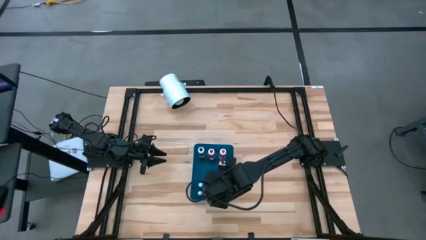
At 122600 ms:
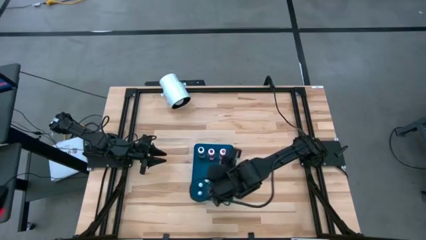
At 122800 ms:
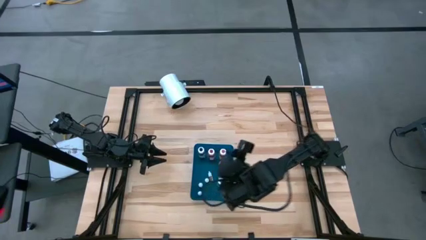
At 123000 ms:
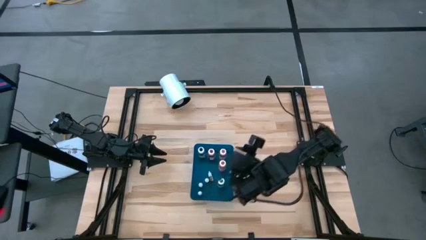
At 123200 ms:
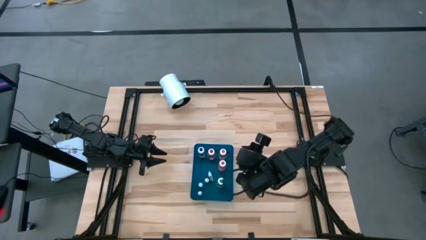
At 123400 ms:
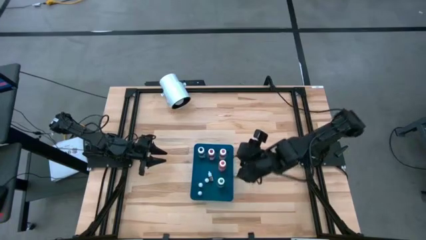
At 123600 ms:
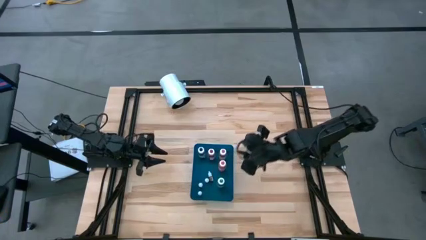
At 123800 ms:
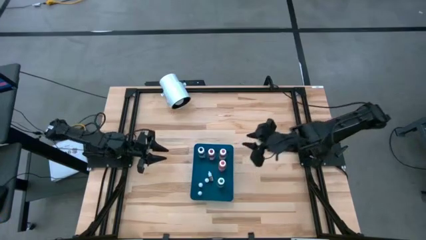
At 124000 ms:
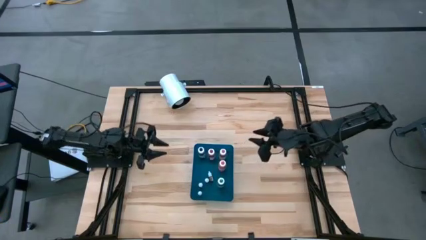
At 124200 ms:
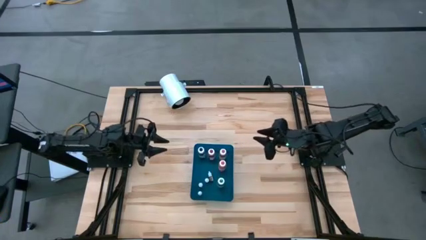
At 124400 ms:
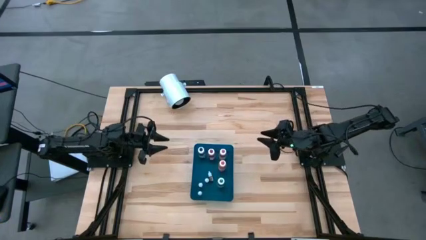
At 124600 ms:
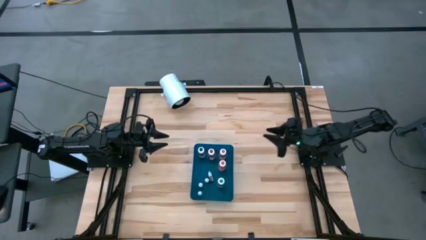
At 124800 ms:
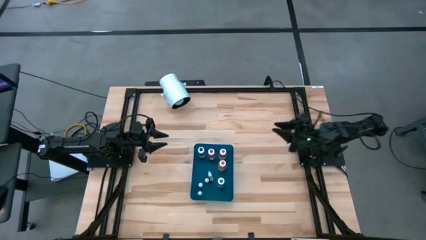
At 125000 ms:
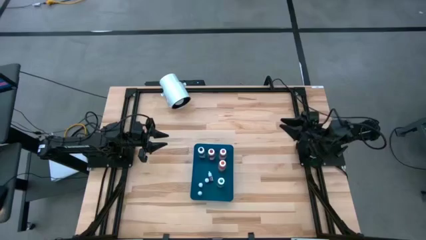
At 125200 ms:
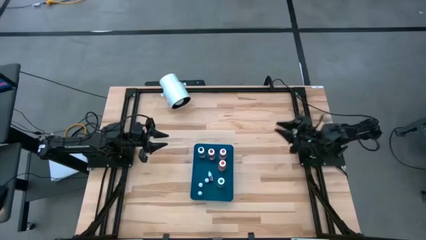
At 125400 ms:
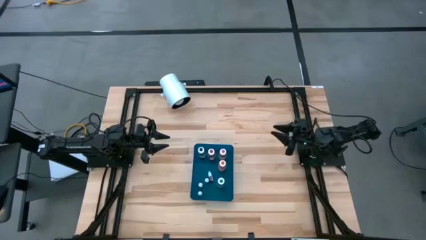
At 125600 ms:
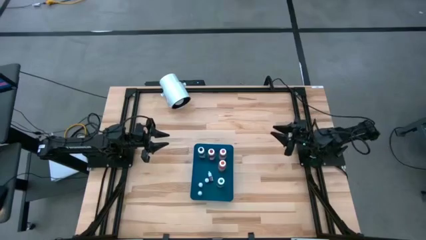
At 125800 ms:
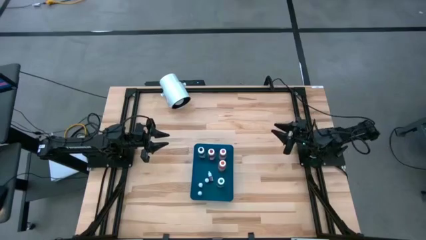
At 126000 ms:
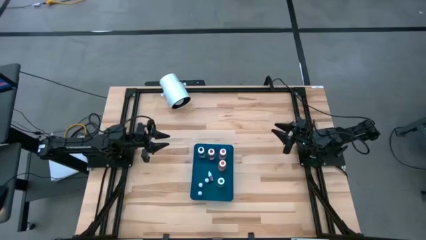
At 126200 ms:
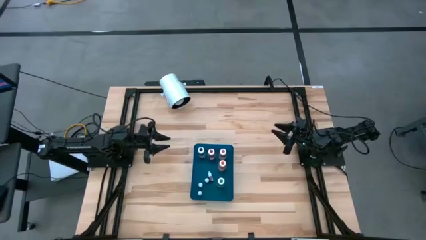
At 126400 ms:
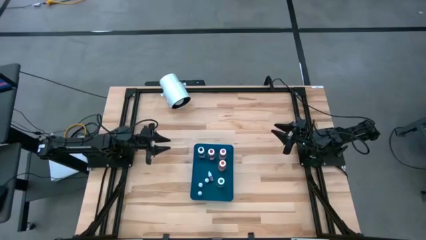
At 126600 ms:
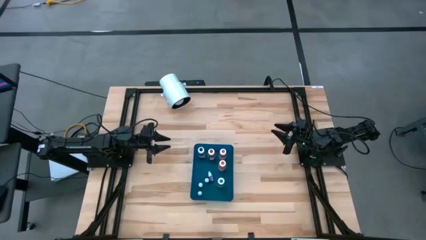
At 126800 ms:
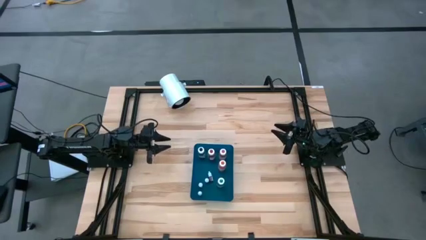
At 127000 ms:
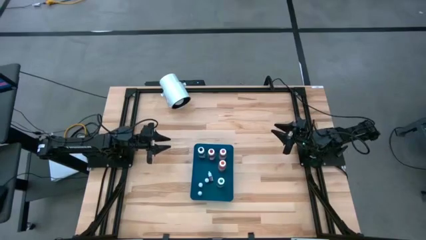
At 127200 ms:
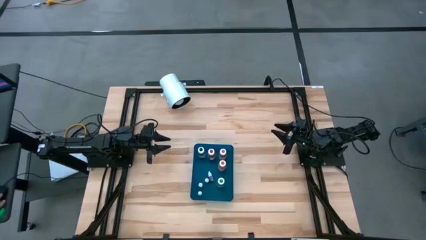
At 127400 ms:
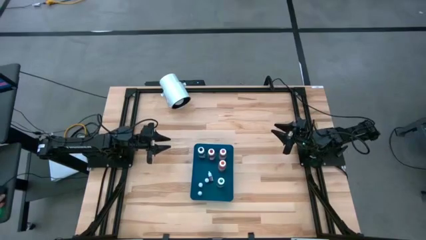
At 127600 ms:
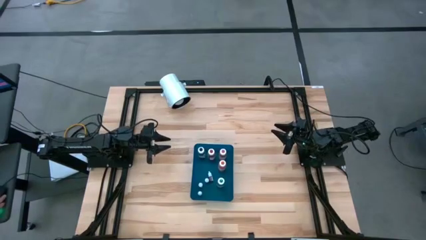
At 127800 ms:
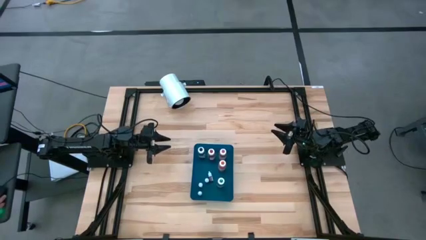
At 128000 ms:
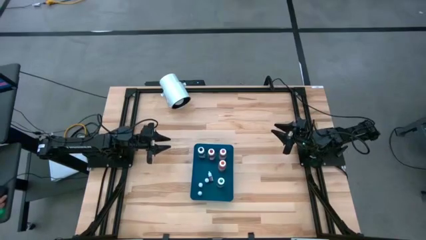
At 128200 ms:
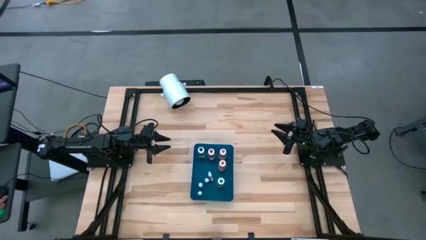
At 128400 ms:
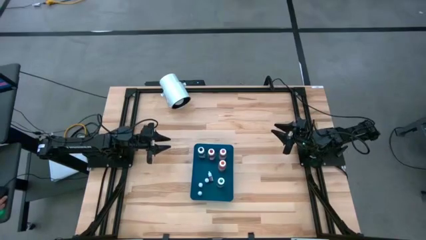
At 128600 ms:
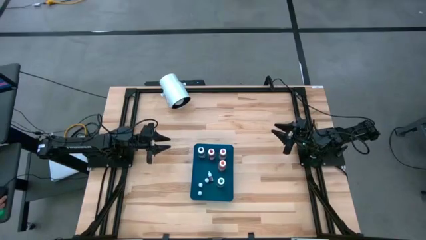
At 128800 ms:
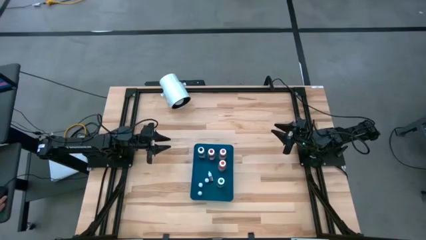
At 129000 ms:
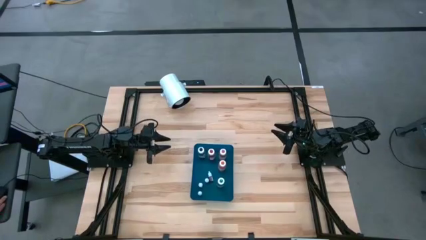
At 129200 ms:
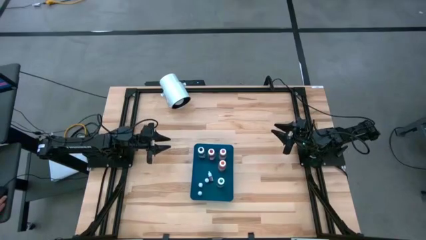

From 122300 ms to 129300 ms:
Task: Pick & Place food coloring
Return to Home Position

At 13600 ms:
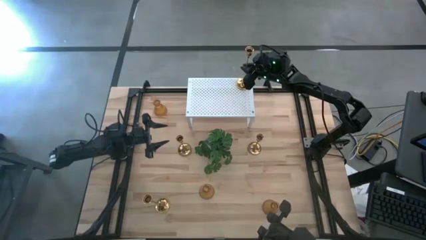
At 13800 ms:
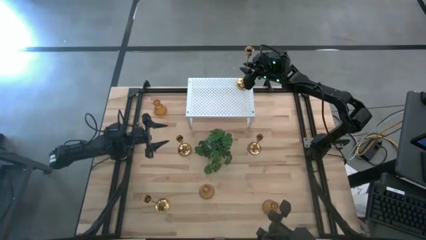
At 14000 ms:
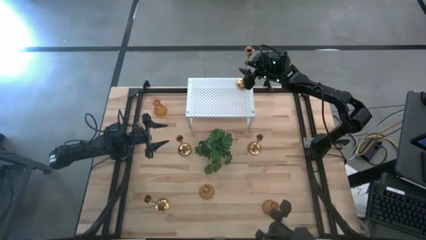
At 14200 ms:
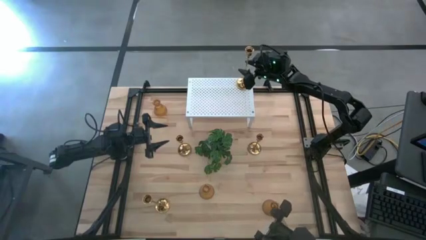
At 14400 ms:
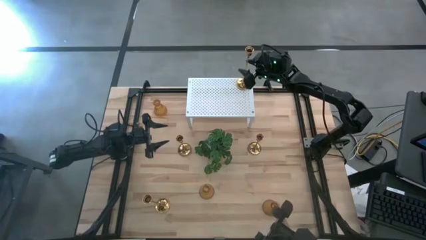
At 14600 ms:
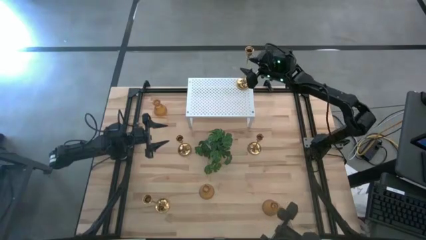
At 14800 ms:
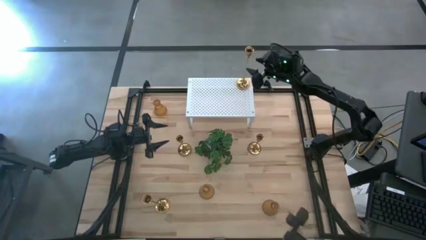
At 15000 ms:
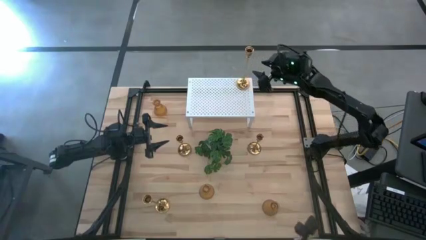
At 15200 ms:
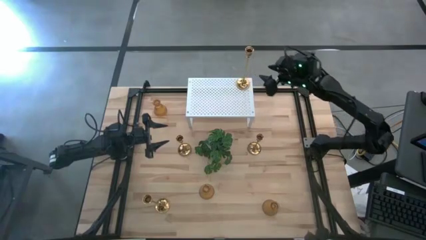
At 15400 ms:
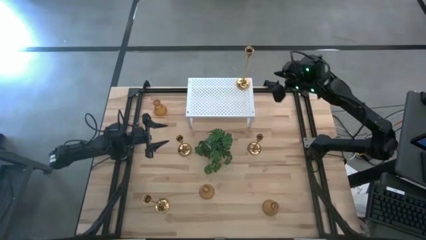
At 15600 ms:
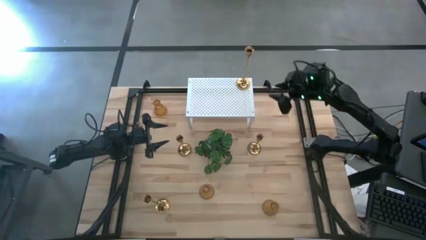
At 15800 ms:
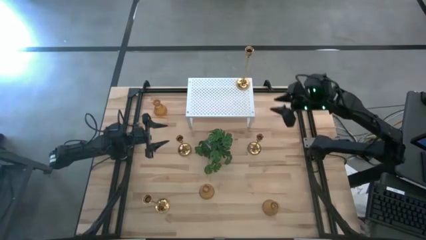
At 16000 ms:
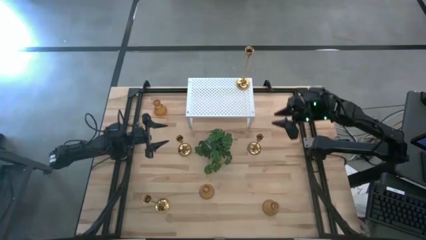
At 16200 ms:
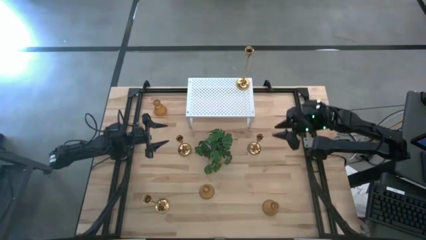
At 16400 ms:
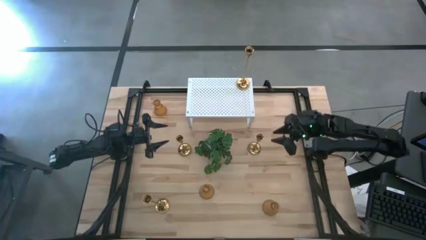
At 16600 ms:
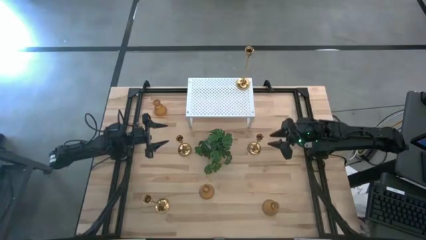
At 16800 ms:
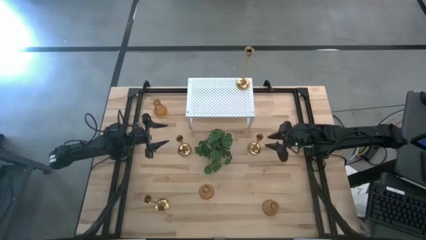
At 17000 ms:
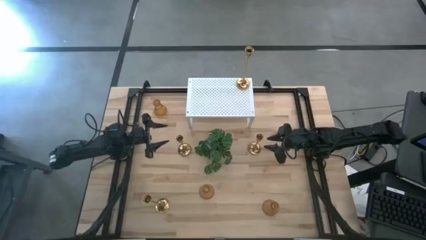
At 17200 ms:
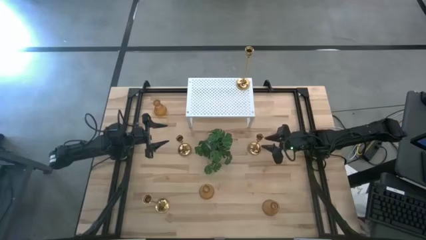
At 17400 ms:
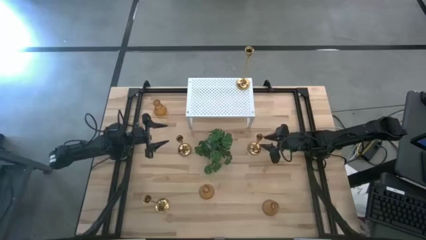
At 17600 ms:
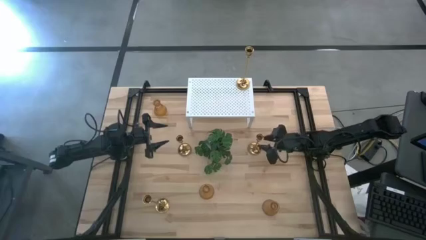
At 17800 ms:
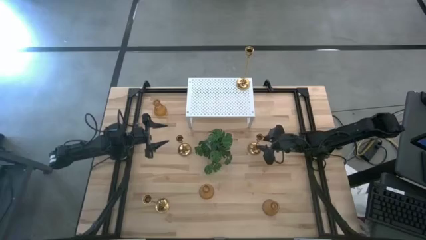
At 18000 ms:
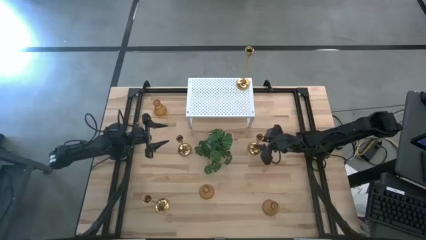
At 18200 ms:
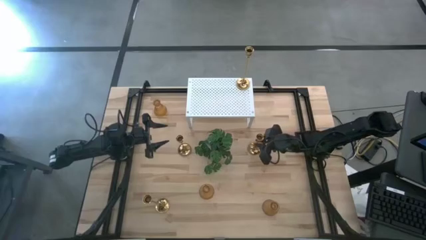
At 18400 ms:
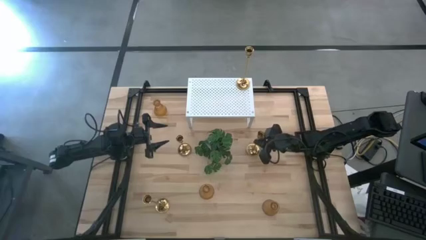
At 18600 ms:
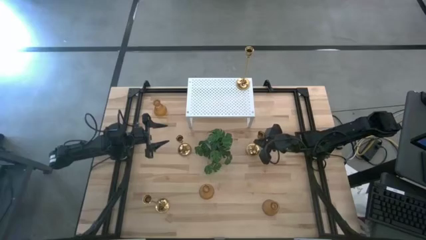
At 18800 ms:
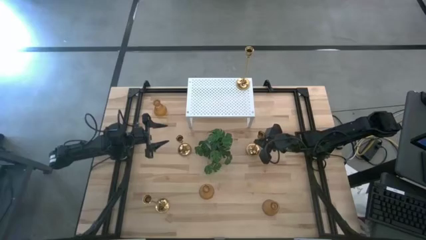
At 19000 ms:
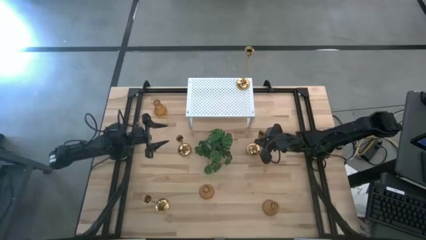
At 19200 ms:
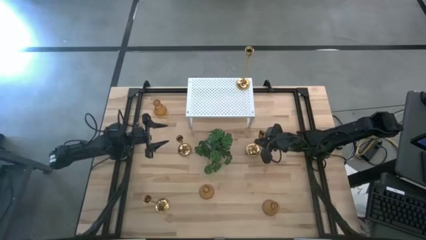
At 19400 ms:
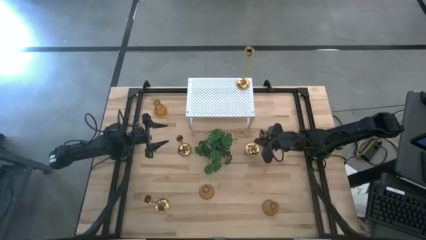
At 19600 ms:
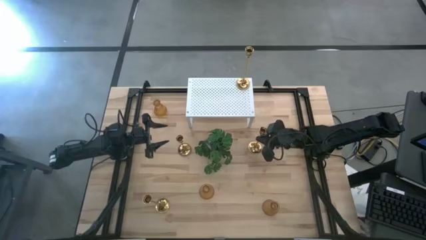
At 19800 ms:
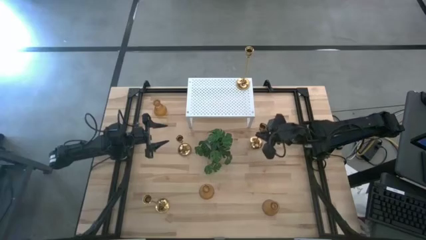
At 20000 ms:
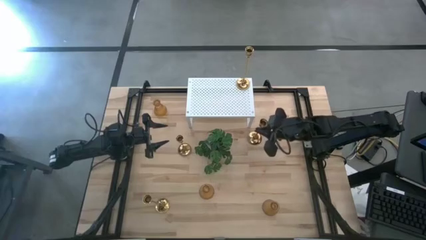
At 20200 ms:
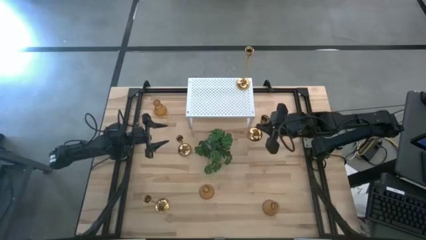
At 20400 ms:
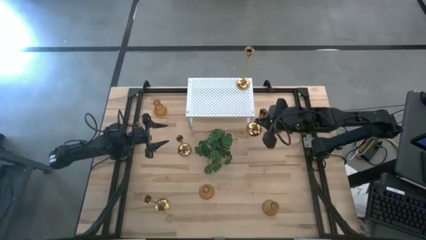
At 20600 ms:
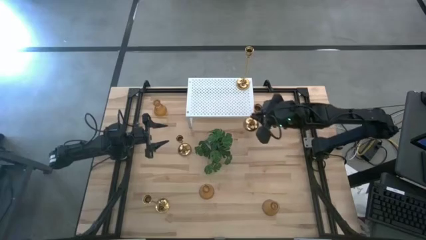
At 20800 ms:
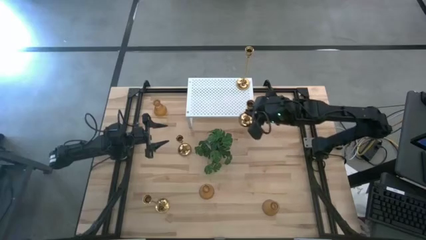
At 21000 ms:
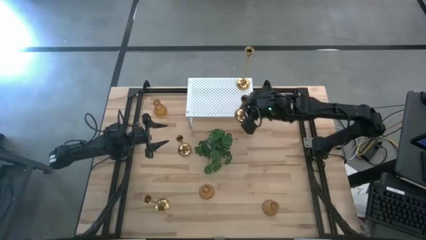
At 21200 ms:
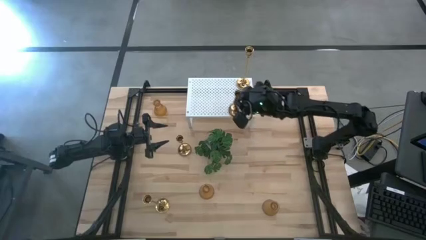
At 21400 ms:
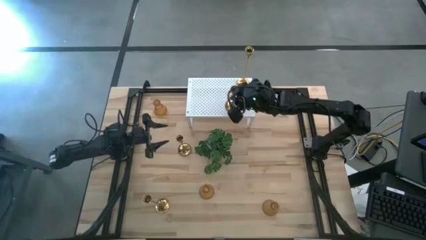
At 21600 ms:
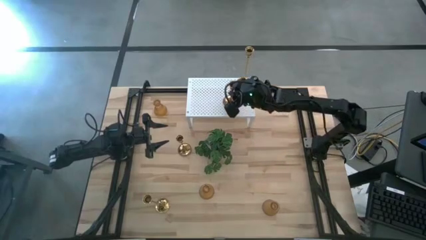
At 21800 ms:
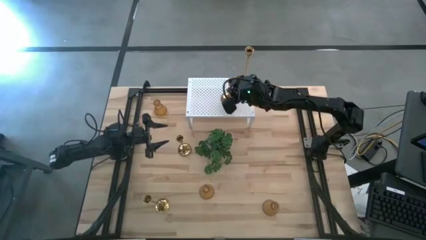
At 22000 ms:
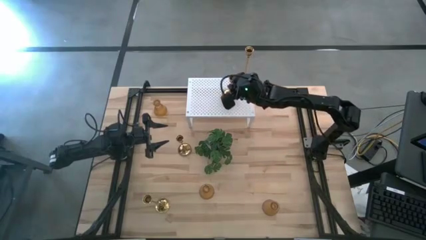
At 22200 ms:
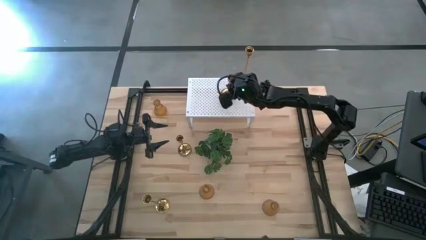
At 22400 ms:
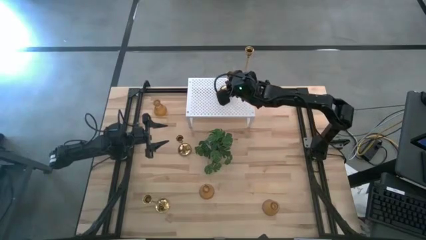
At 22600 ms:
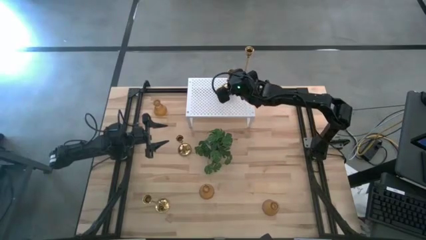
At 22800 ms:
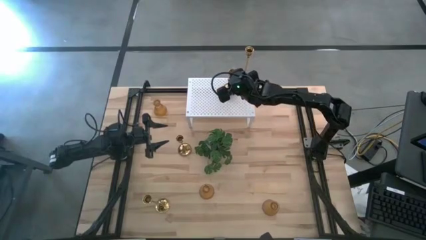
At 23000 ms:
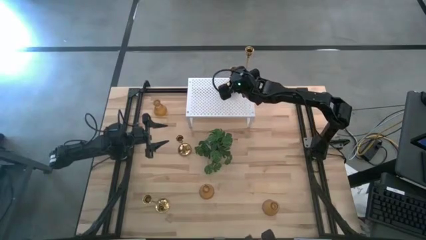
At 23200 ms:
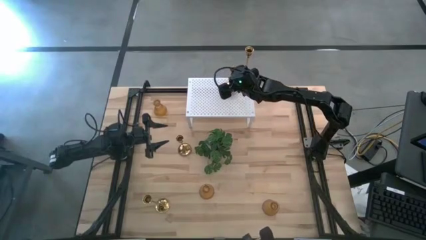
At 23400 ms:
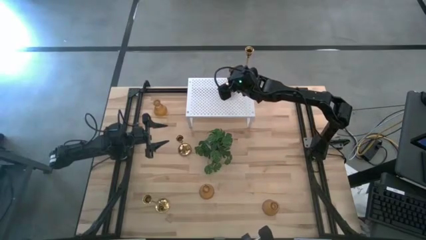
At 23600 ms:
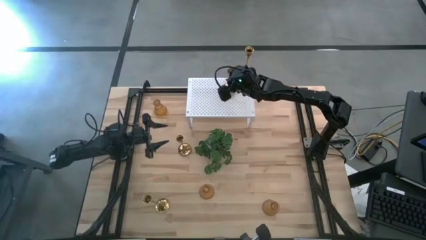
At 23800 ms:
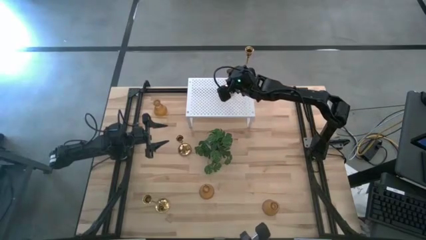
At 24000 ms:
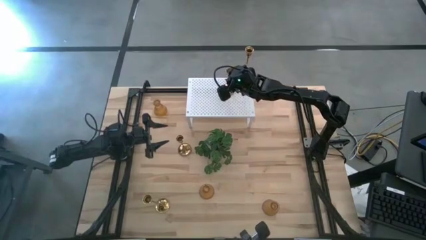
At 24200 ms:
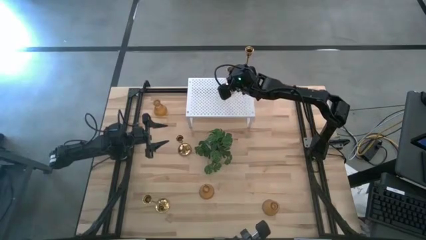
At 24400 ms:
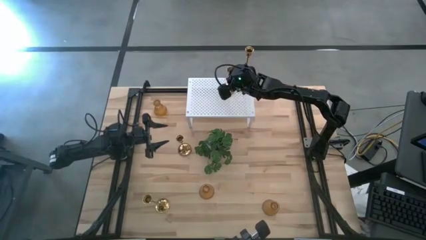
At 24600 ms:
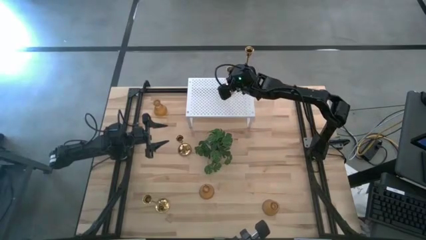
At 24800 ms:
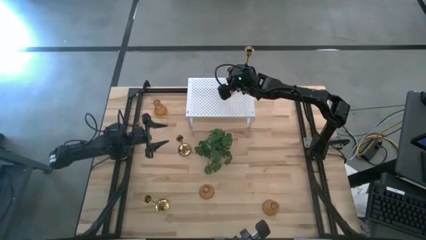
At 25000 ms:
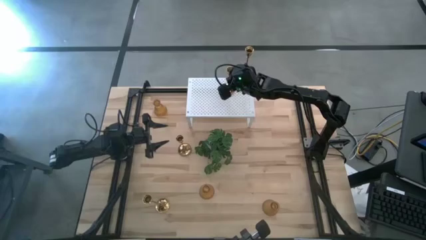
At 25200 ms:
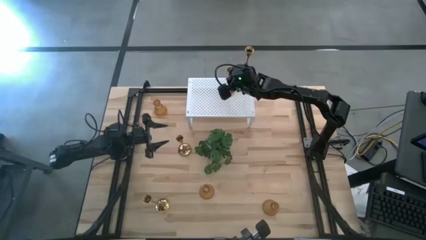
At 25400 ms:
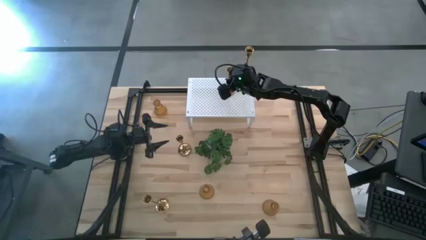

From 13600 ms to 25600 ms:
Task: Pick & Place candle stick holders
Put the small gold candle holder on the shelf
